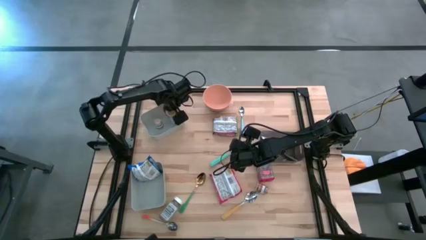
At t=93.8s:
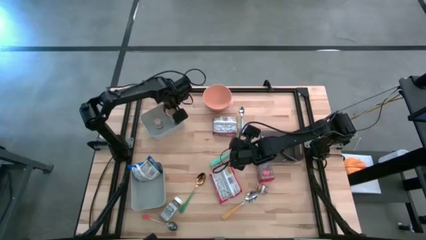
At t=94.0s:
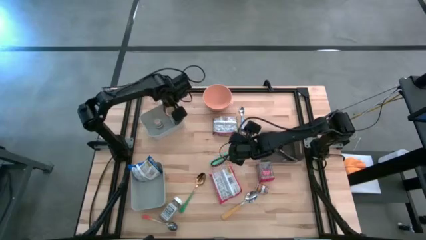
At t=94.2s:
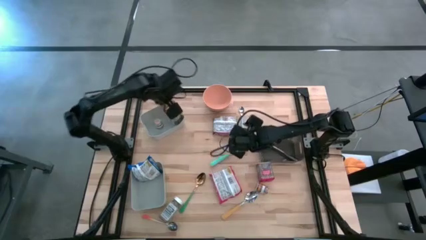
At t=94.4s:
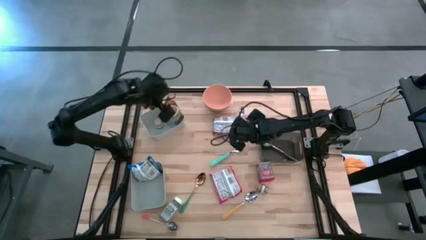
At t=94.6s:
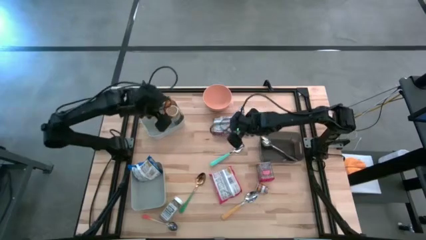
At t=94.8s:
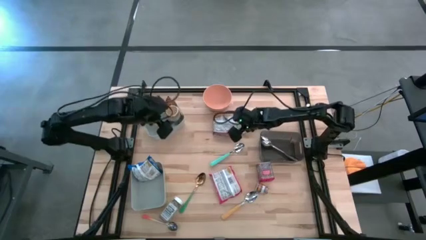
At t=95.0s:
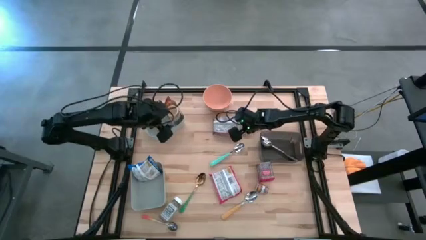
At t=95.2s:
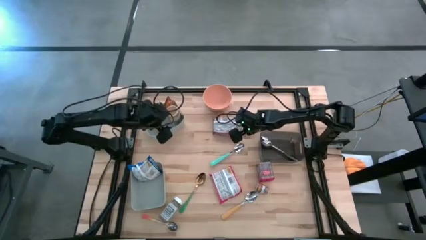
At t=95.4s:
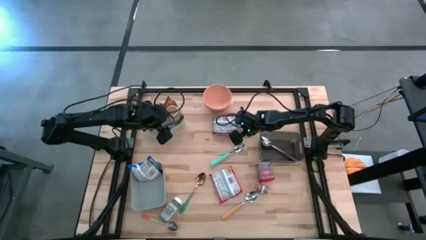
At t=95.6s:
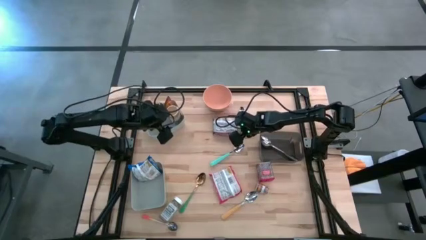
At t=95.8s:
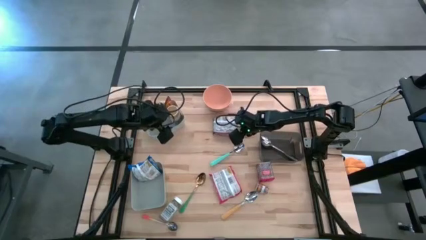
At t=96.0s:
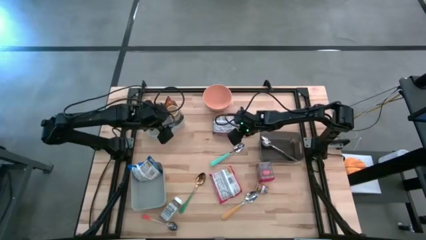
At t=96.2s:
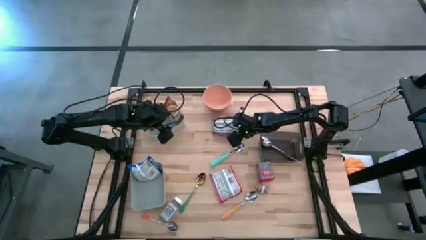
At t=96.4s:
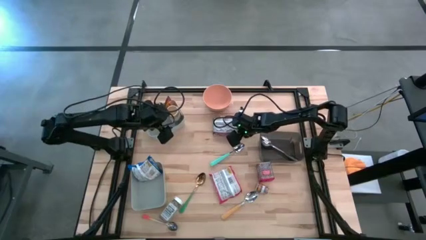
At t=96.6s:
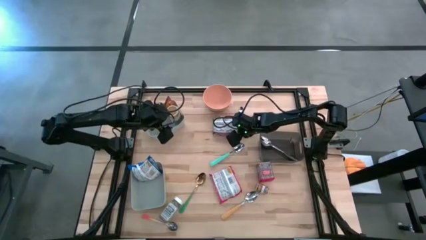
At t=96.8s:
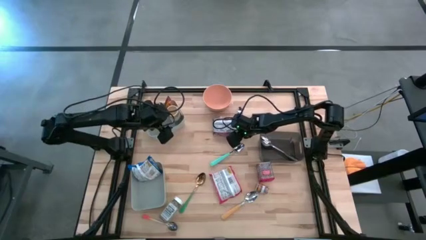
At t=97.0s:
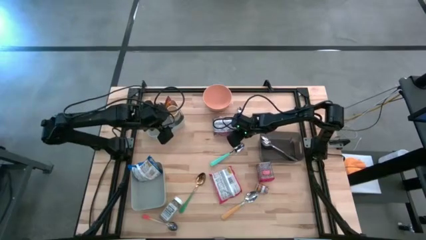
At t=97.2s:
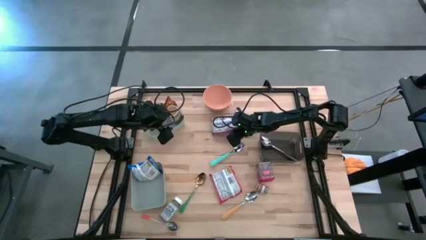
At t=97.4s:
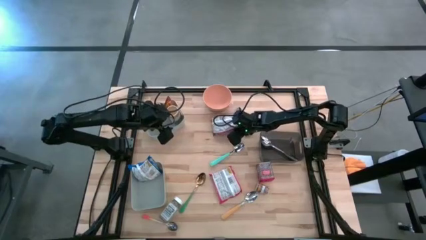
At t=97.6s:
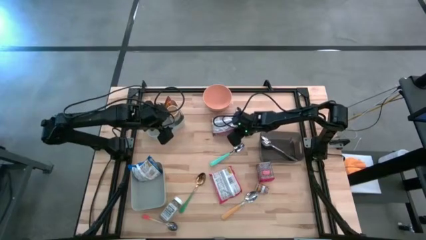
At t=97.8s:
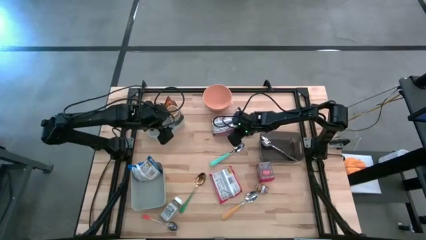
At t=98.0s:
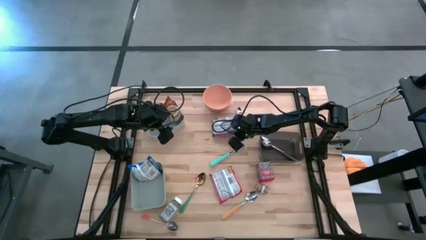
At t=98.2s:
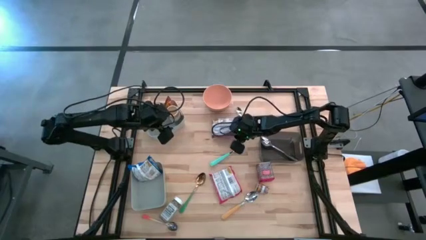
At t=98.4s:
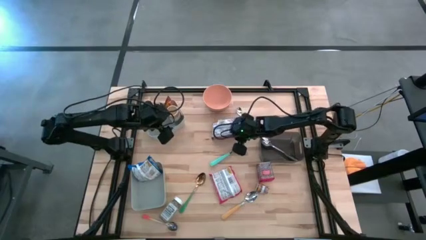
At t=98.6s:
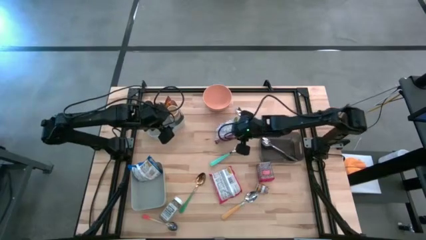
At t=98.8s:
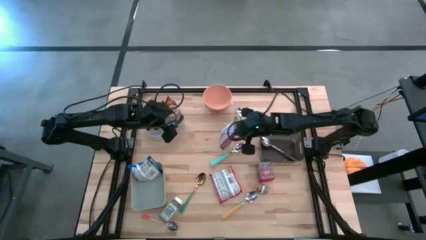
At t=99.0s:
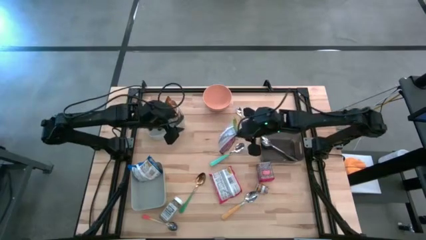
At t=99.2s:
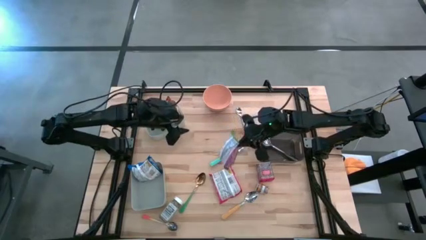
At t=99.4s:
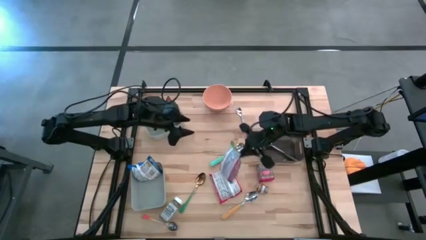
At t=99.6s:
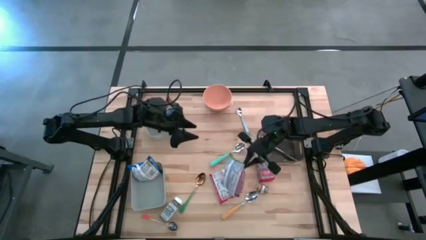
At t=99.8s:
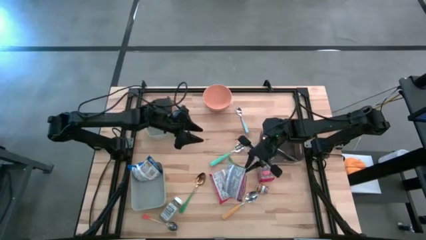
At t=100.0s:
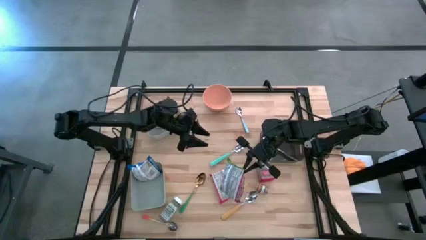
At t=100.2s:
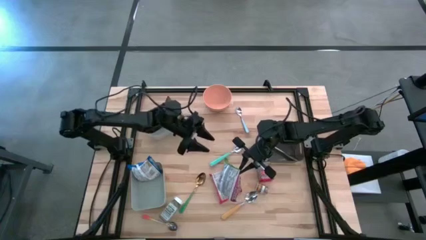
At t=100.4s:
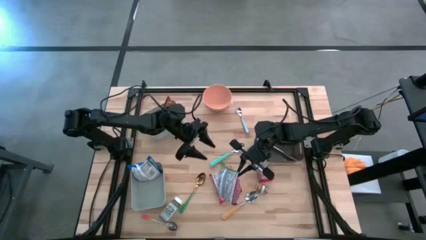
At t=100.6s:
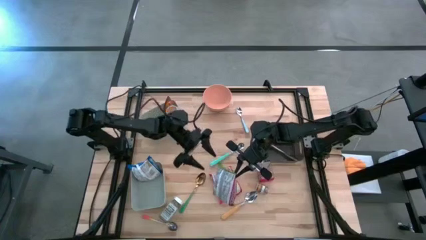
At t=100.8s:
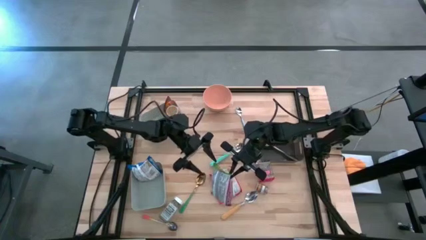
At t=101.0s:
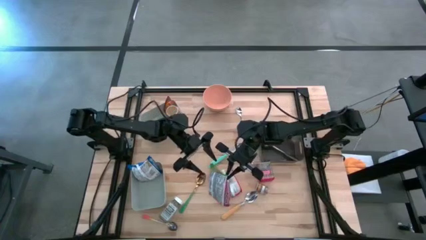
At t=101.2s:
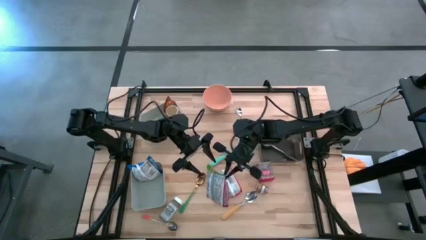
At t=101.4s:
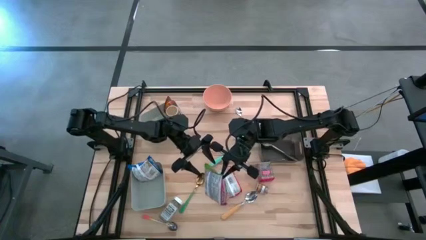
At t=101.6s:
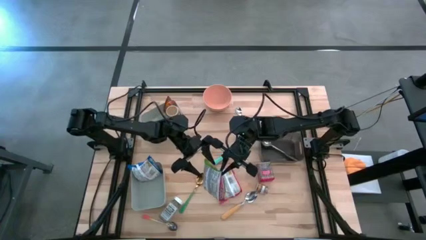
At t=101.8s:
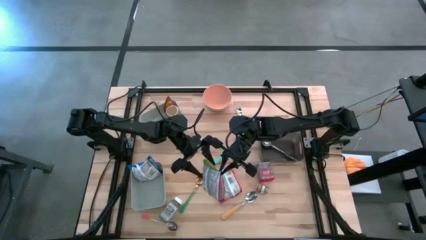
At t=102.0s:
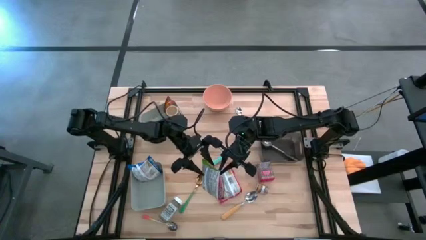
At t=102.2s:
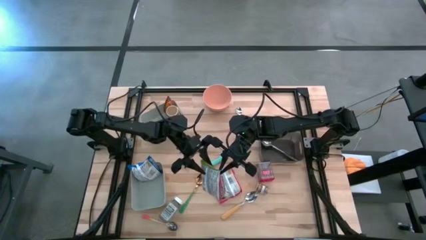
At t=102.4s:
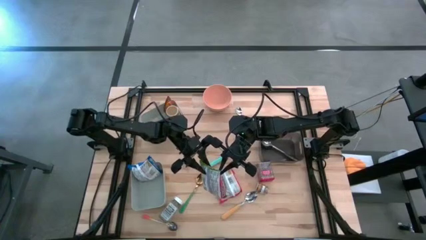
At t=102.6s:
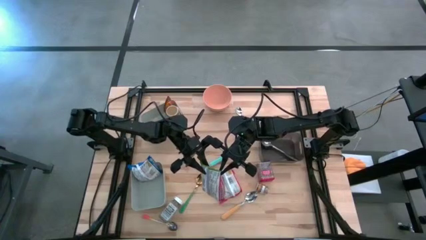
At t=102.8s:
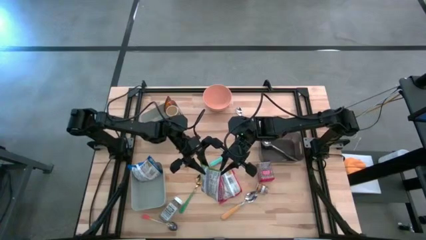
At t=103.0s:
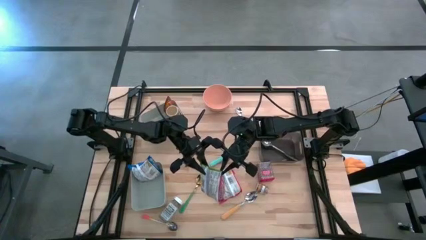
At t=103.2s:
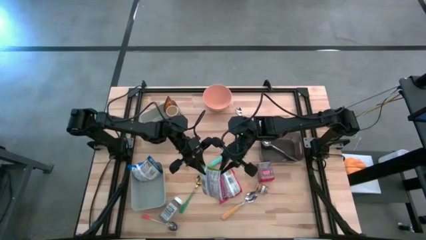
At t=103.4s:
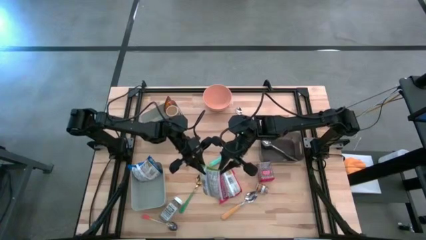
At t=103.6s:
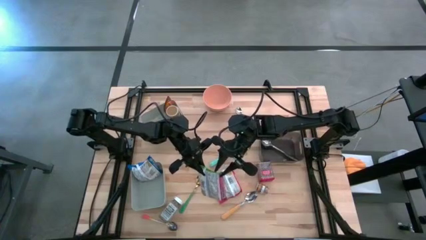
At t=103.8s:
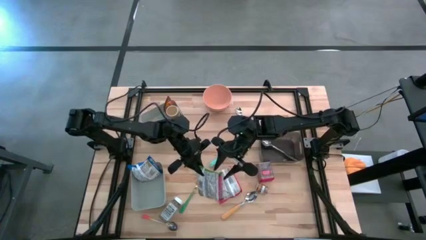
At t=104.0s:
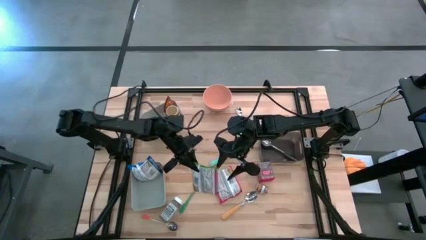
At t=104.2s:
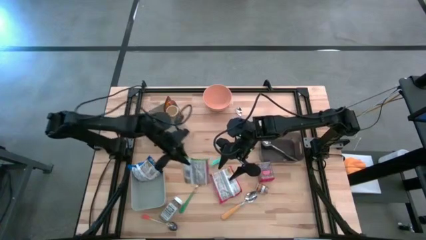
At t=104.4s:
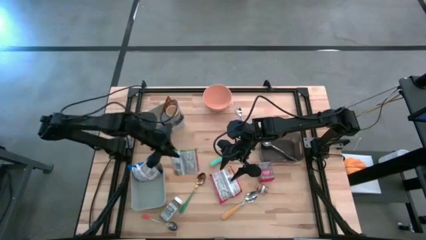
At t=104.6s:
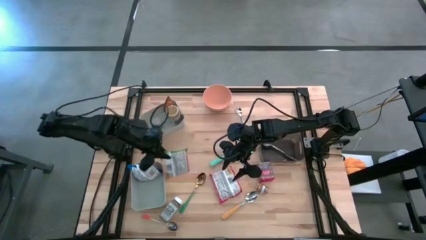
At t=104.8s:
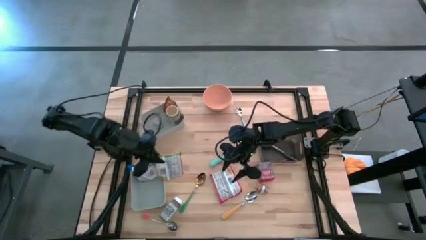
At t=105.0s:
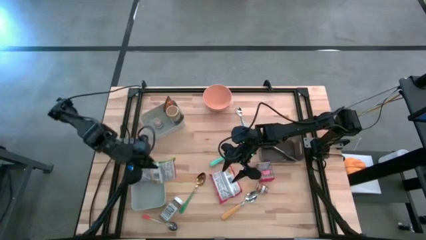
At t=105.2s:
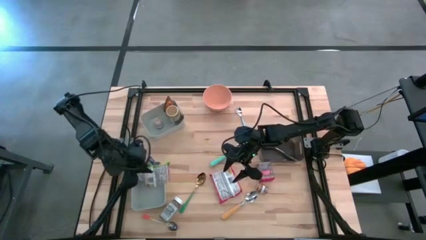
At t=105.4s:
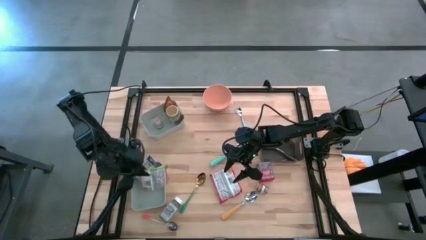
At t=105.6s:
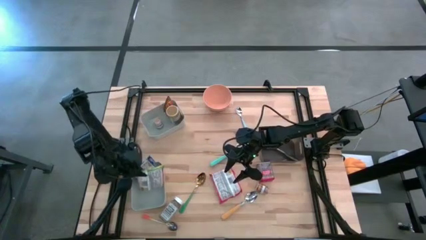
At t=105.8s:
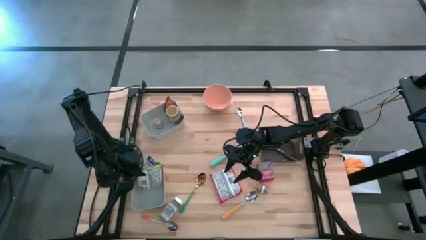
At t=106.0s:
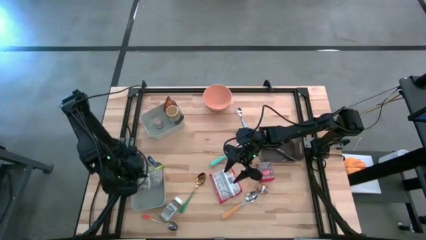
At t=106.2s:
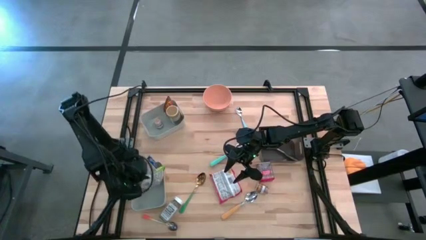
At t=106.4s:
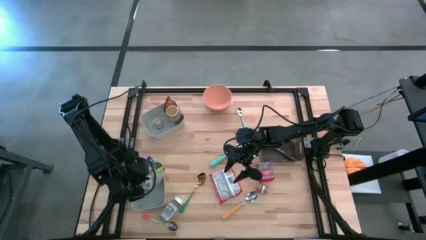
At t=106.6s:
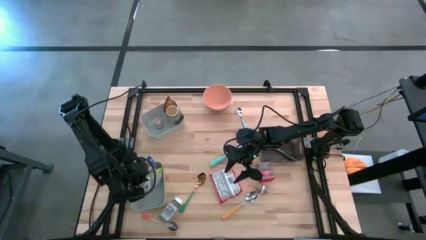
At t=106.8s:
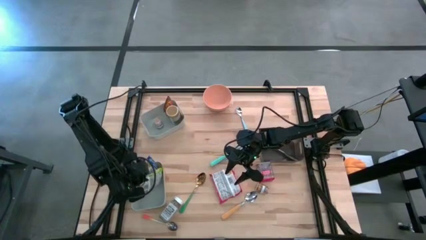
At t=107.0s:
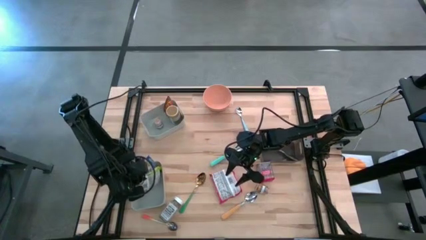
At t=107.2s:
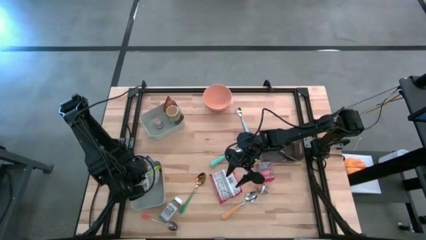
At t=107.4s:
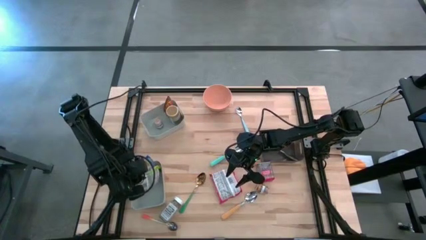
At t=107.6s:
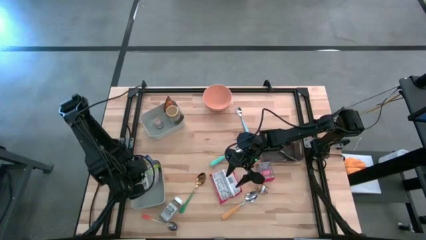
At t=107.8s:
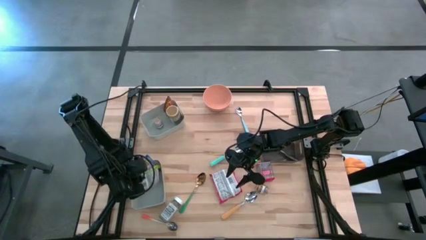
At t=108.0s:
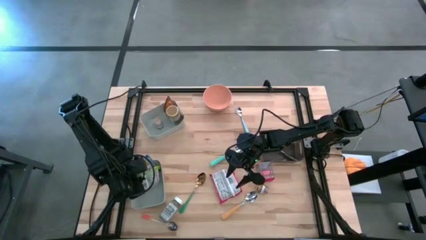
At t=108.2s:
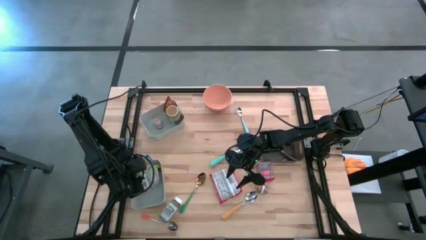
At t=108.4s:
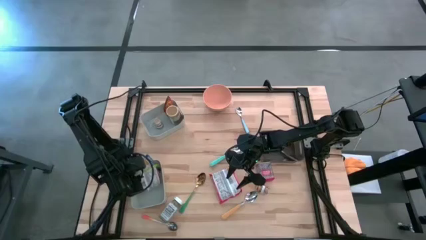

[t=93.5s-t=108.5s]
Put the green noodle pack into the bottom gray bin

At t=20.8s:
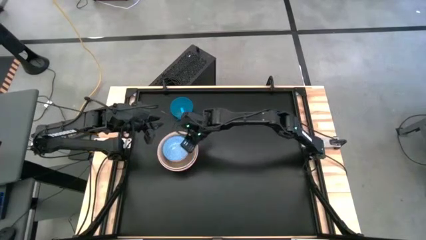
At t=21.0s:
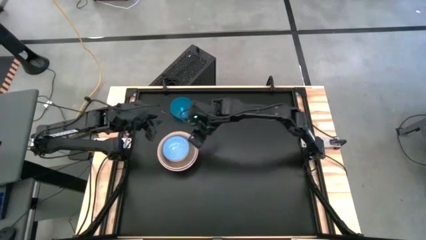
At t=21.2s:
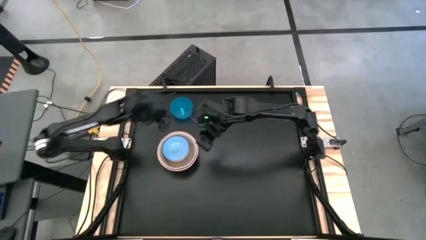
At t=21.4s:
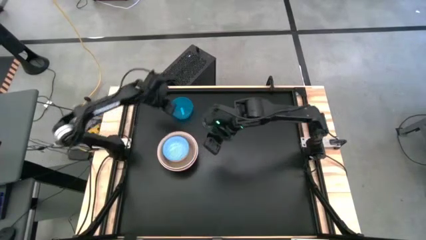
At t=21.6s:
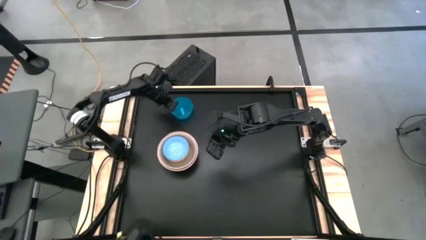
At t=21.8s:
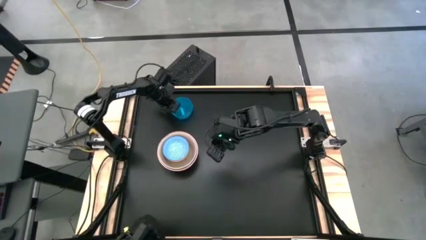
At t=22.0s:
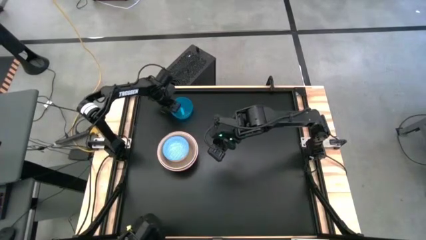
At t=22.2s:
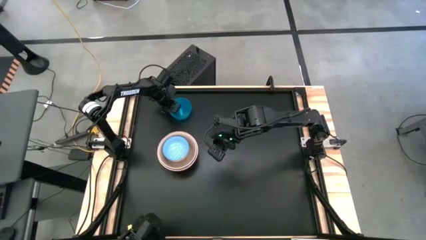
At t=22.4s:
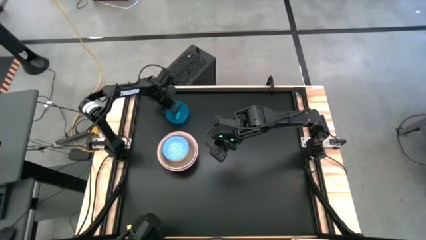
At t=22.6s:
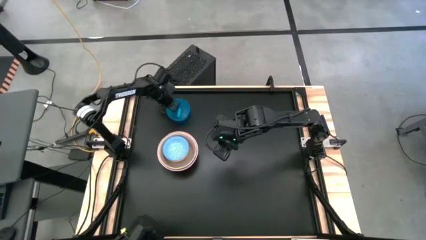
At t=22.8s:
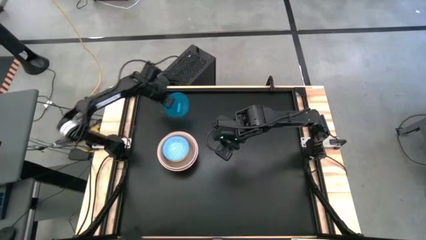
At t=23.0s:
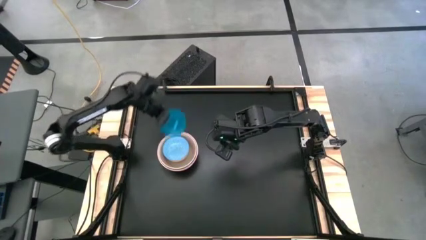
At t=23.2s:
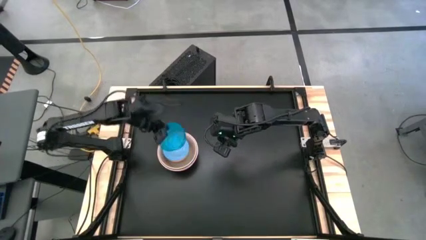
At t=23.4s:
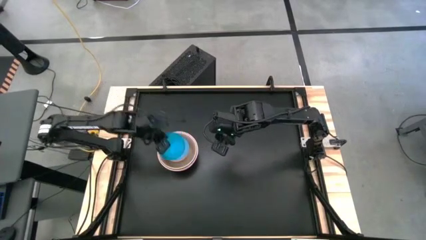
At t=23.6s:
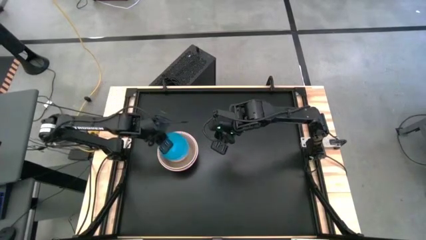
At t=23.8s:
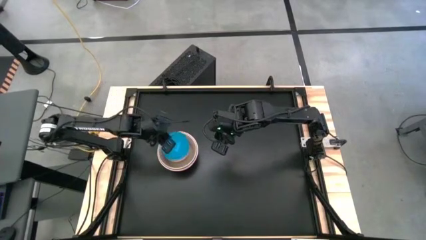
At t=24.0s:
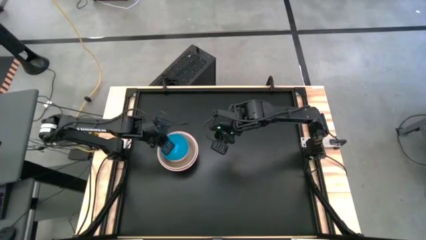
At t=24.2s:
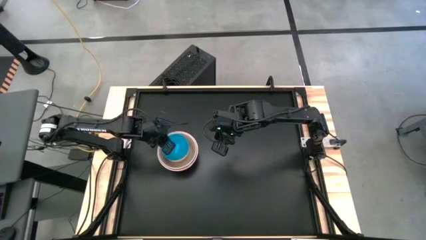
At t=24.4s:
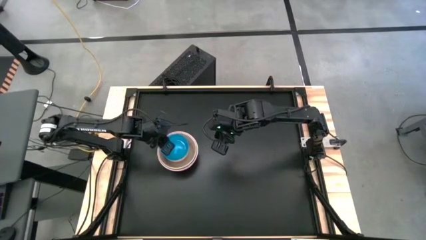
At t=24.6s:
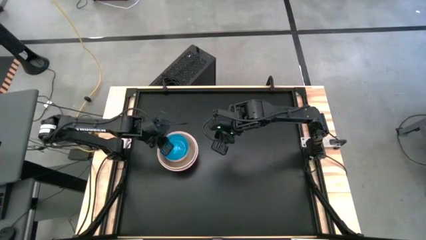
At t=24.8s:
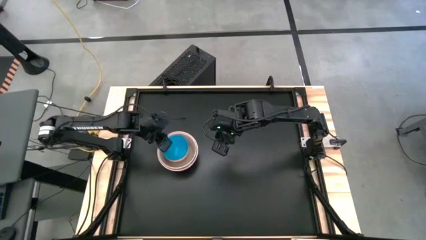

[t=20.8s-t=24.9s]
Stack the transparent blue bowl on top of the blue bowl
